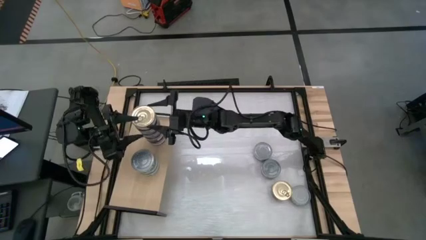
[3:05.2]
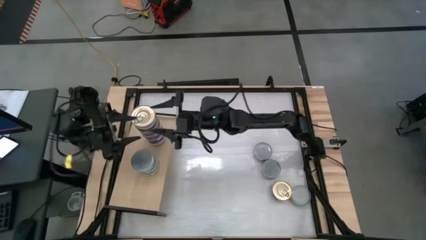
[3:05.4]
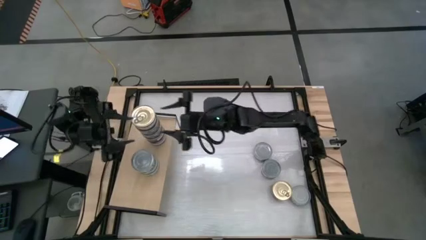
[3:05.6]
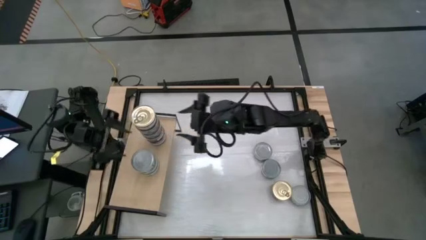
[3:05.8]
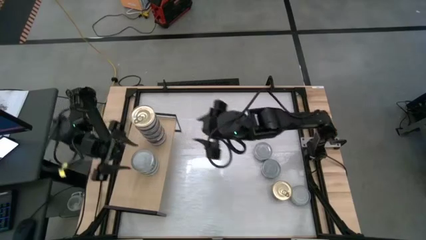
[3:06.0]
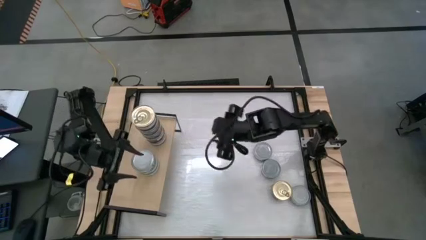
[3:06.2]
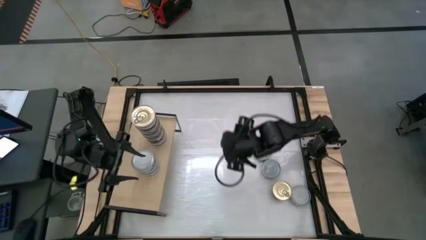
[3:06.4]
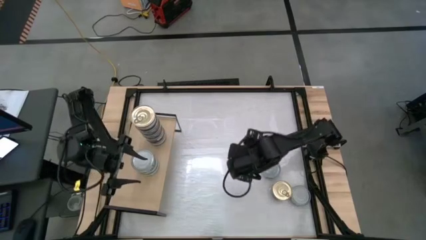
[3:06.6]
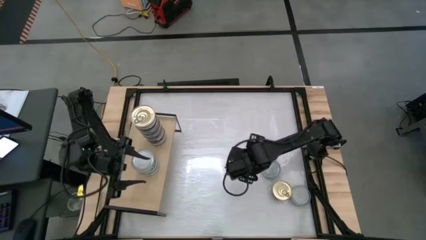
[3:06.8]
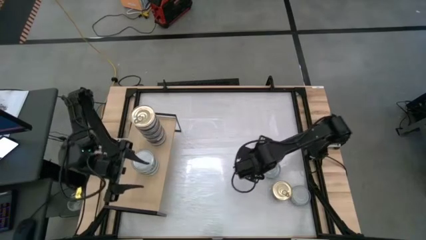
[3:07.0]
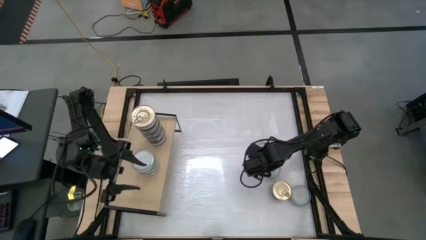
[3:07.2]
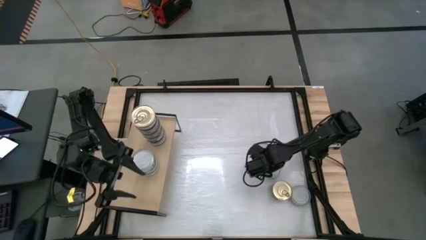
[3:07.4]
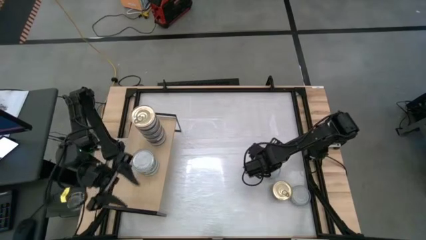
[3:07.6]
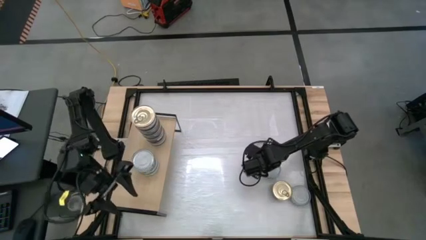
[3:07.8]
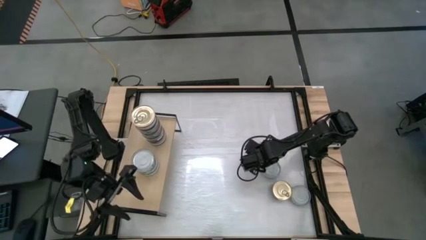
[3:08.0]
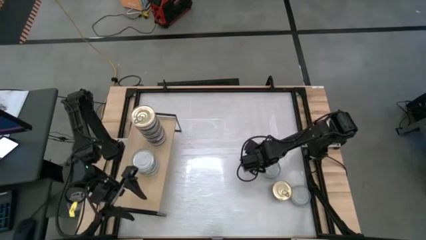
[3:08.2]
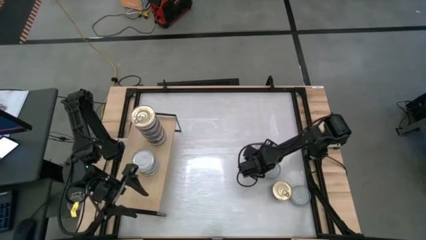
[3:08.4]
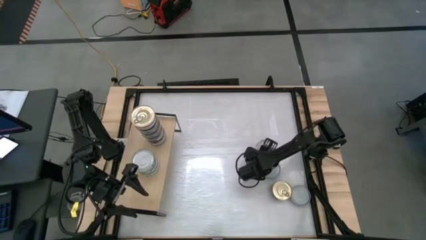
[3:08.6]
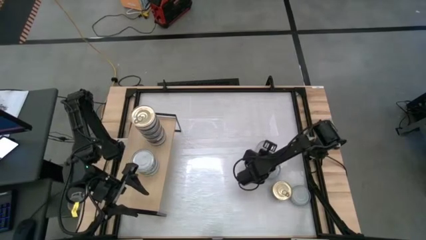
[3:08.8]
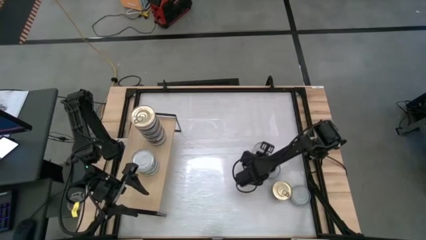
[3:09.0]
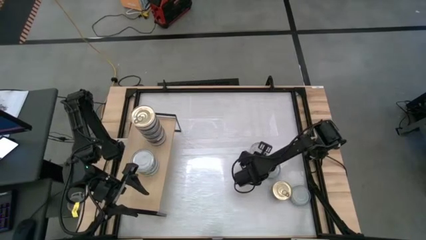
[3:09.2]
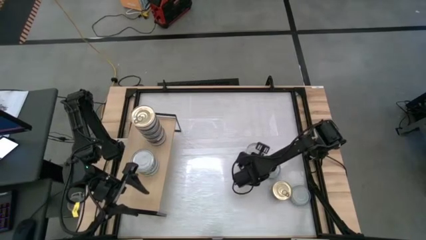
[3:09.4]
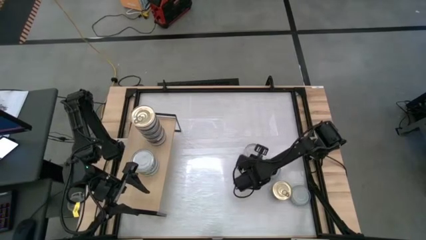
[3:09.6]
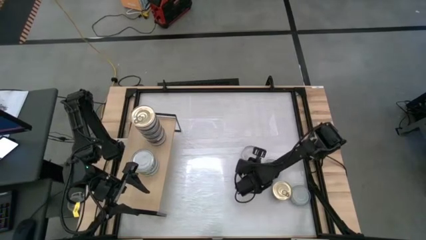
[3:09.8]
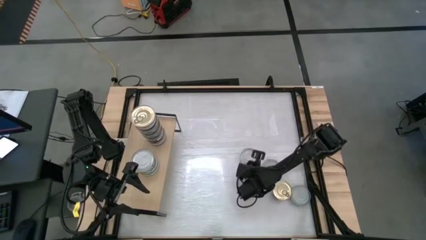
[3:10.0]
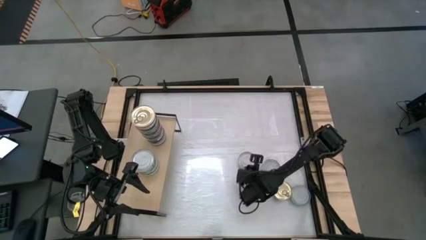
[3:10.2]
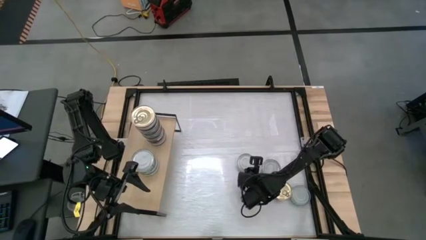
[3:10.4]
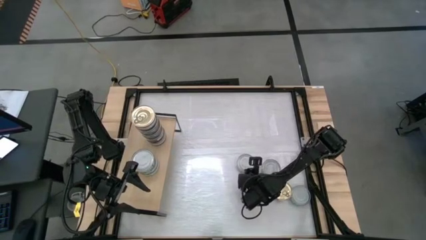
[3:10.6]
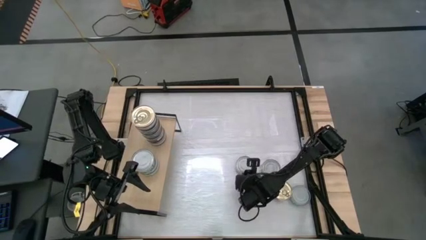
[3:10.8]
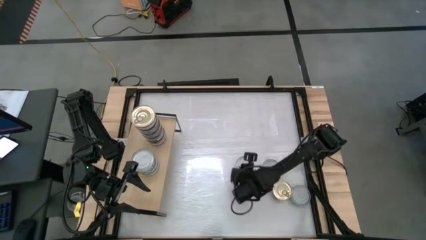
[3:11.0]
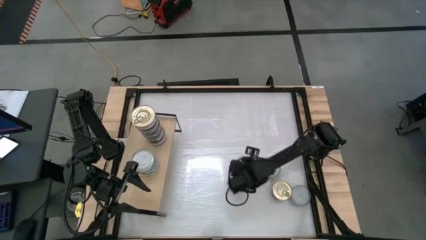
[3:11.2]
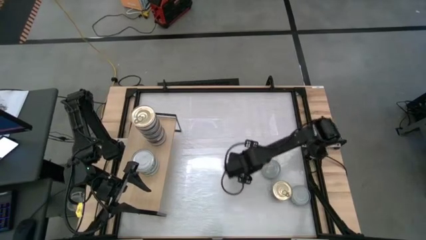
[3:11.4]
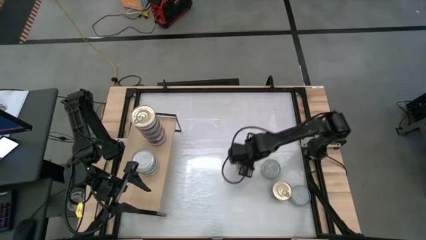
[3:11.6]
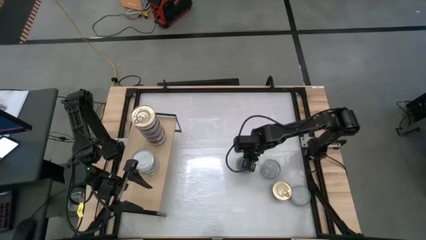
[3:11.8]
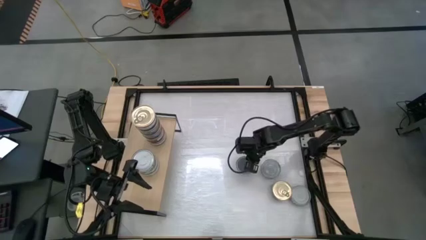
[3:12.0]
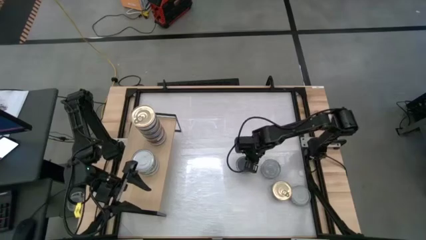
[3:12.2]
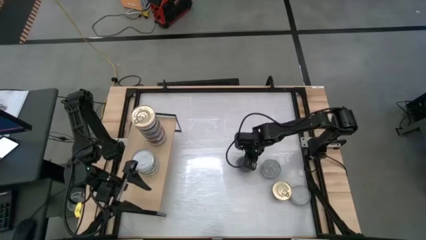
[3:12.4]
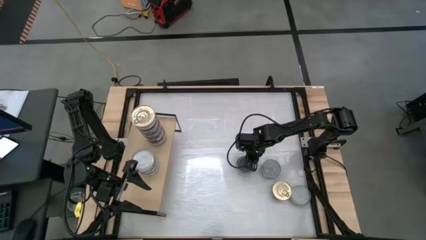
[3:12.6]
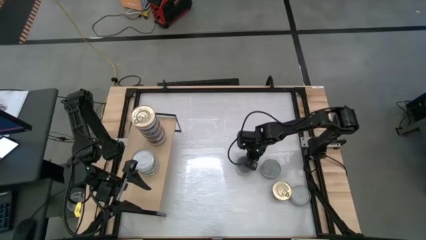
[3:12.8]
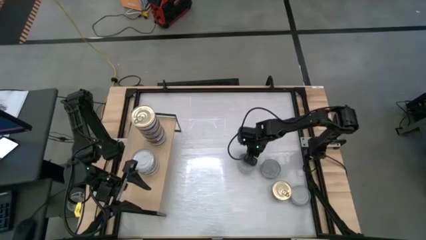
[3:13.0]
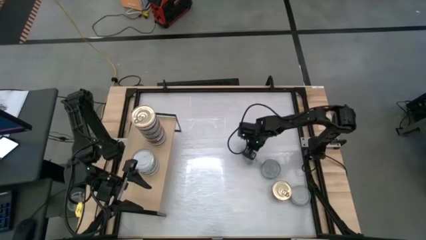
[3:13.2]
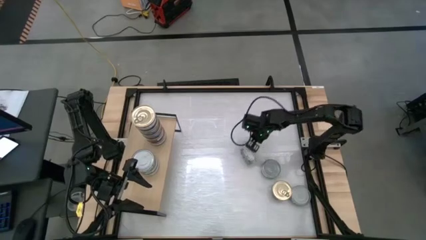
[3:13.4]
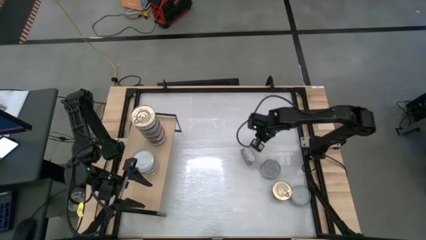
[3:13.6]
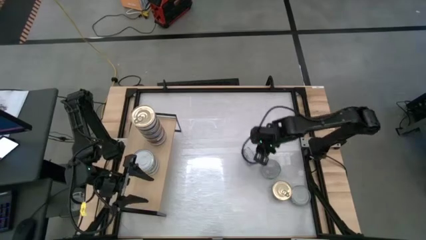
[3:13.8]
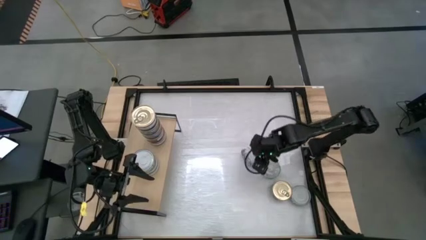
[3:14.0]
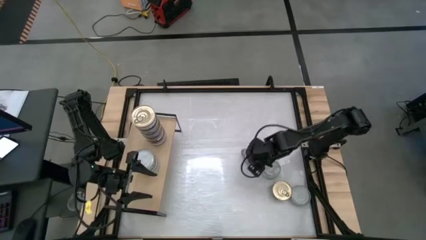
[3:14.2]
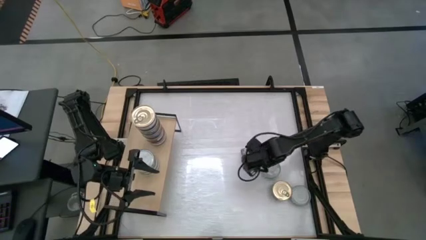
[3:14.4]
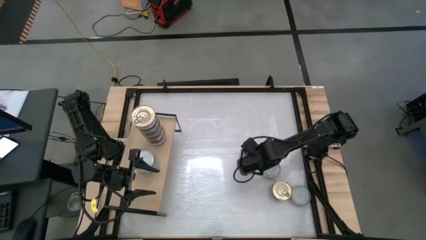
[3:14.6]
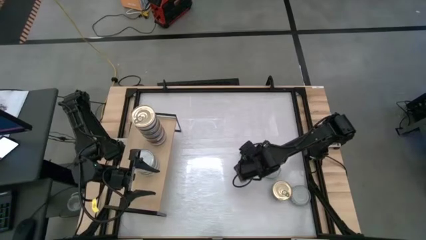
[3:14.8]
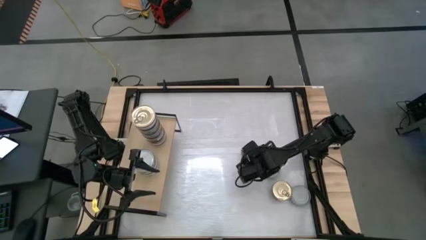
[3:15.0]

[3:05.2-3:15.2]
Task: Stack canned seafood by type on shelf
Stack the green tuna can on top of the green tuna can on the shelf

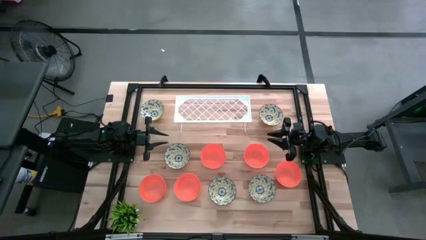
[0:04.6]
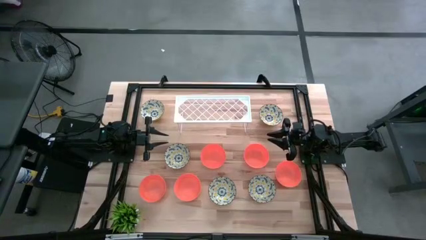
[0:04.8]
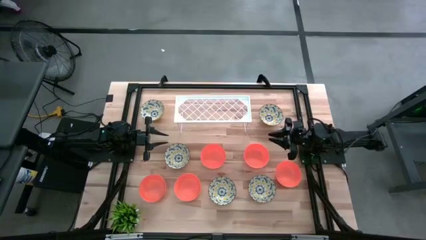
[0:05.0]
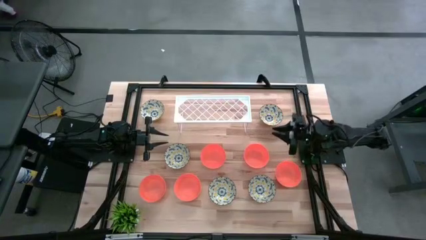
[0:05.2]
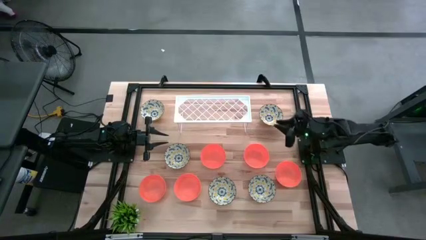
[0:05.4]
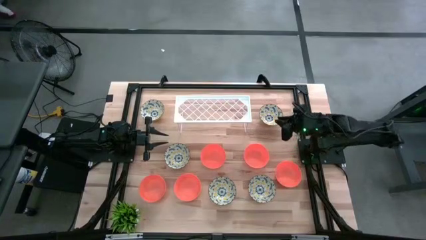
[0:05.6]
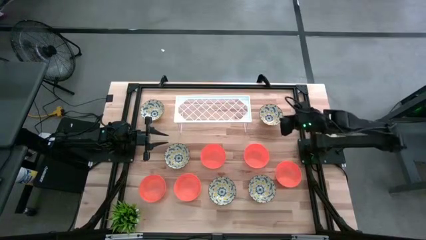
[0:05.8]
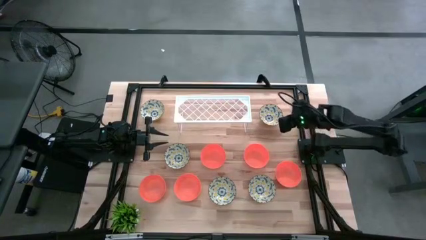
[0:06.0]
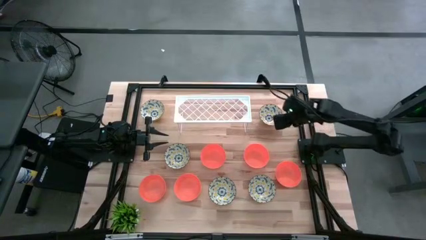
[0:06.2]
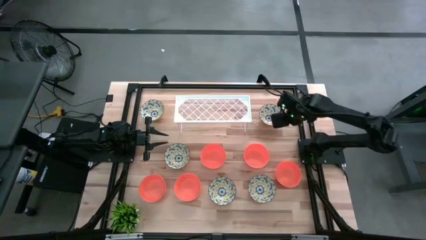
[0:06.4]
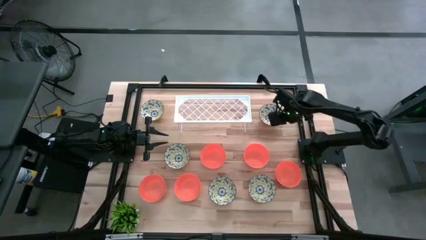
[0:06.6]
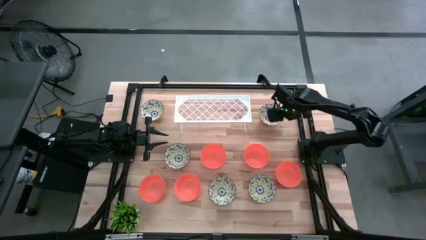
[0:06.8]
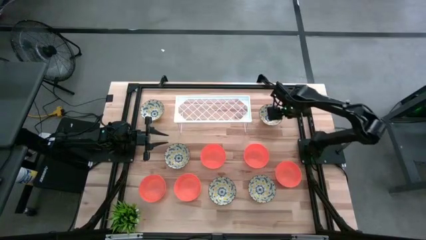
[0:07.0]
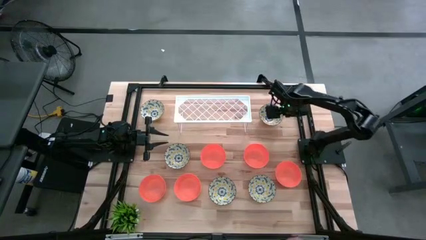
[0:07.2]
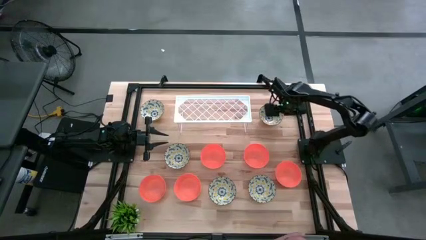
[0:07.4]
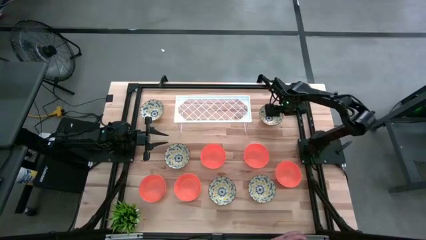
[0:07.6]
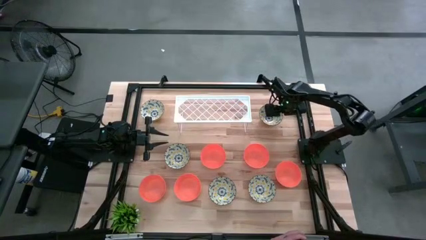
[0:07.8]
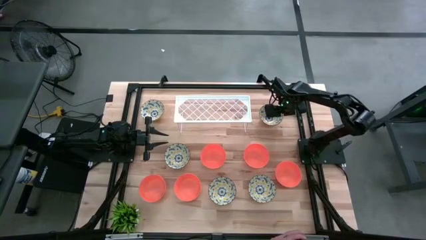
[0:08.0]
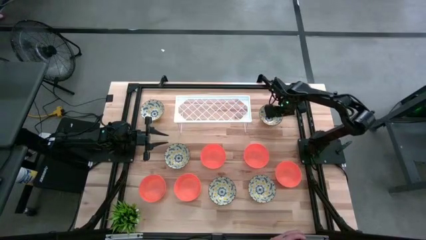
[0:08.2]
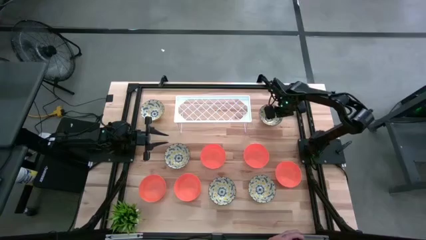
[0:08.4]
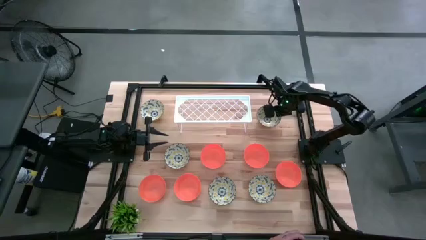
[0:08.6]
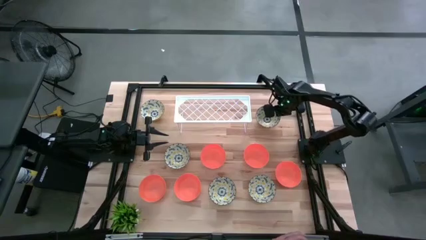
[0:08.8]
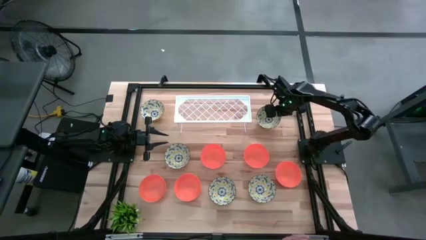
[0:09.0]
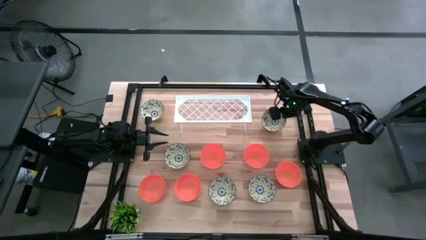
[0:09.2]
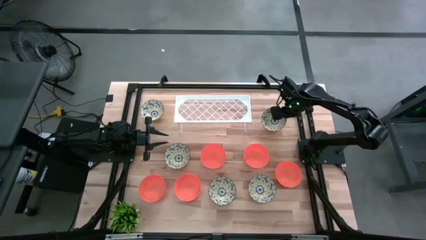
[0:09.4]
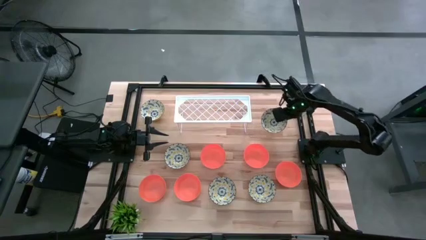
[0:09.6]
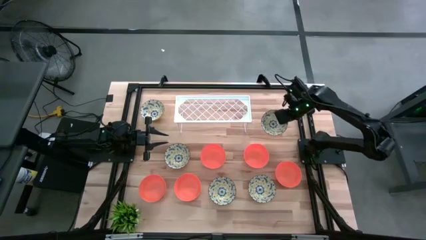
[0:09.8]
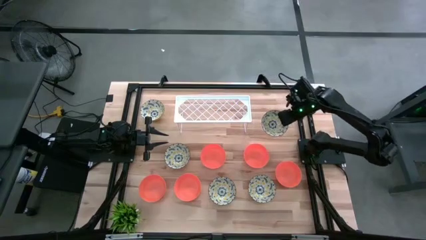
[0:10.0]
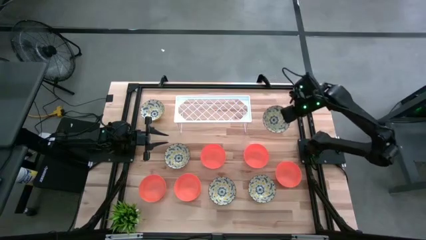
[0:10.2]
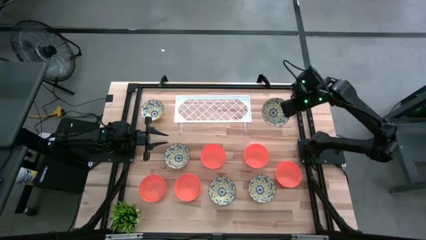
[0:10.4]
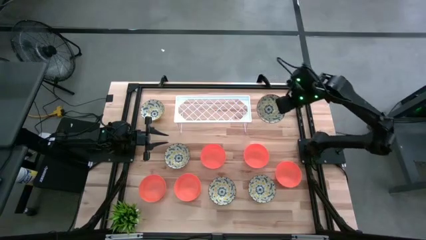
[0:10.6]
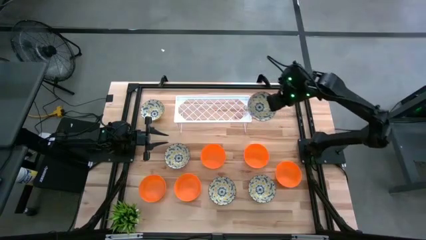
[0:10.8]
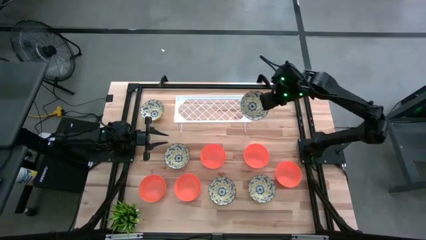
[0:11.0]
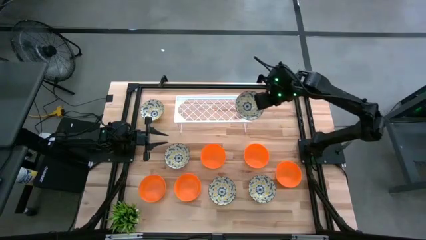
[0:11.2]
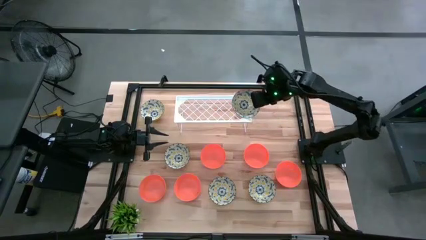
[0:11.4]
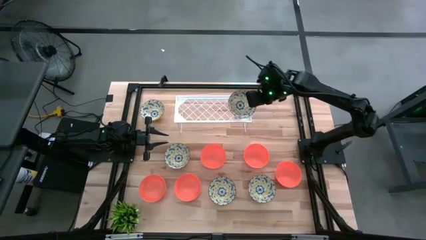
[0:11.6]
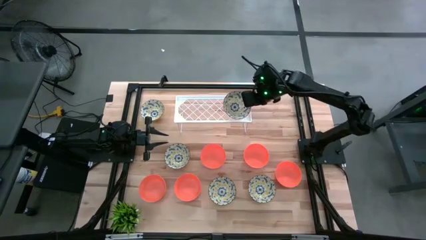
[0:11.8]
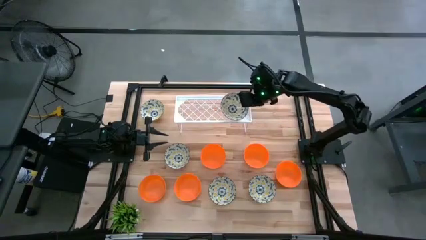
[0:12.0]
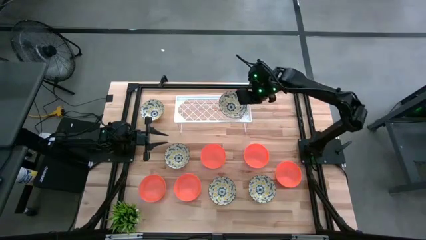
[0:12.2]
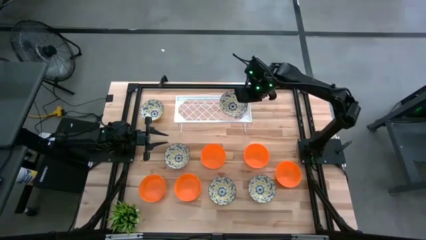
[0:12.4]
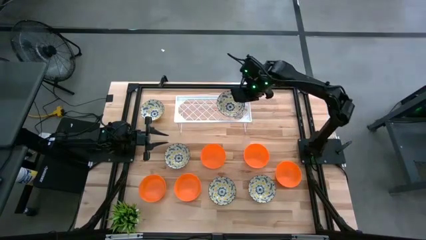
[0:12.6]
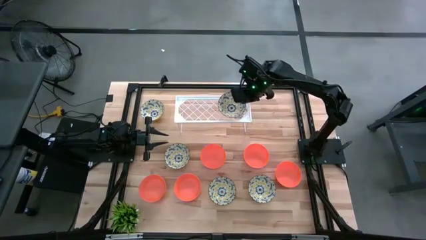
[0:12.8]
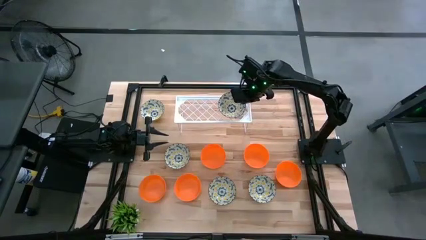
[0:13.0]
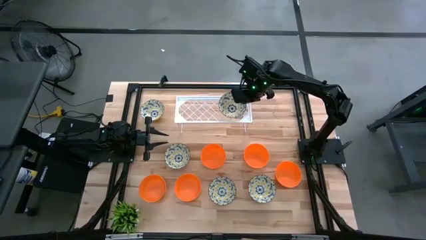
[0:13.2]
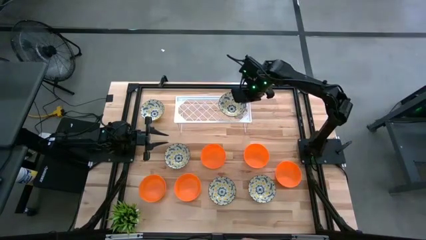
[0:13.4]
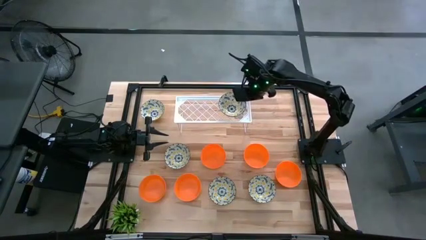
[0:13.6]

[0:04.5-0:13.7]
Task: Pick & Place Mini bowls
Put the white patterned bowl on the shelf
